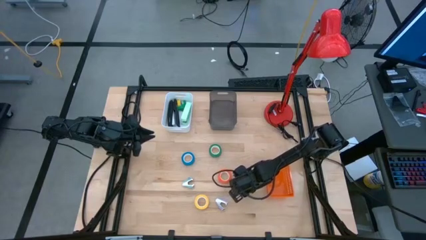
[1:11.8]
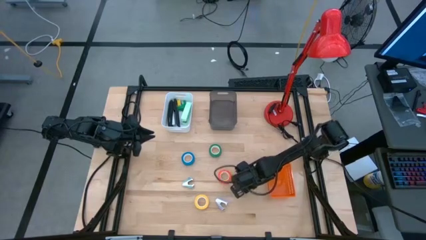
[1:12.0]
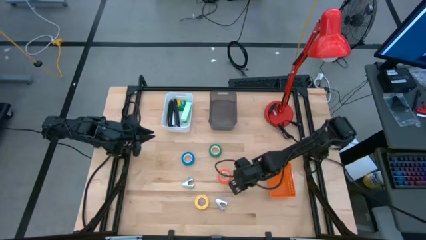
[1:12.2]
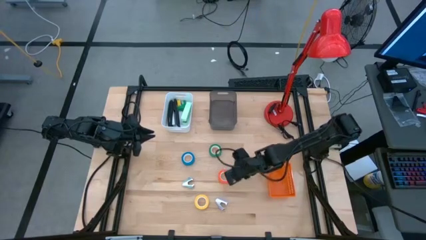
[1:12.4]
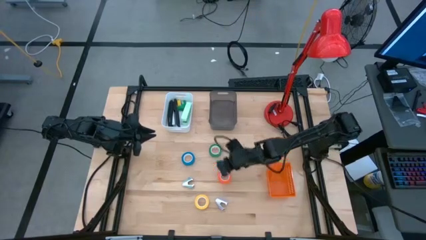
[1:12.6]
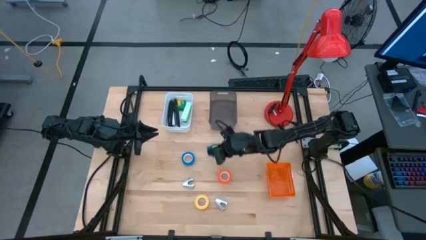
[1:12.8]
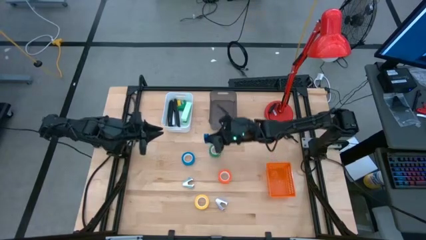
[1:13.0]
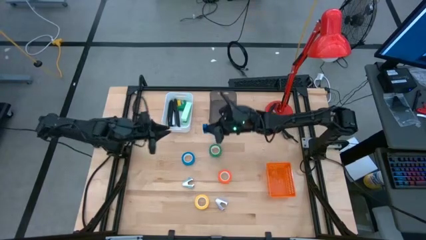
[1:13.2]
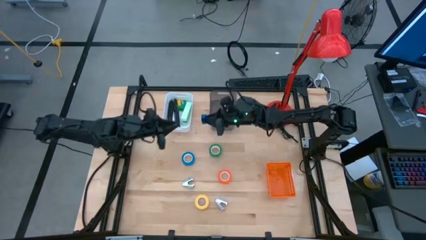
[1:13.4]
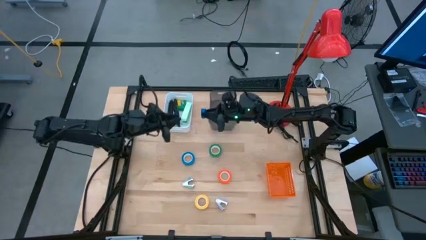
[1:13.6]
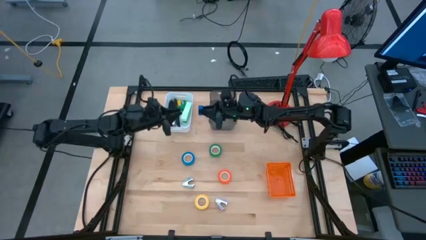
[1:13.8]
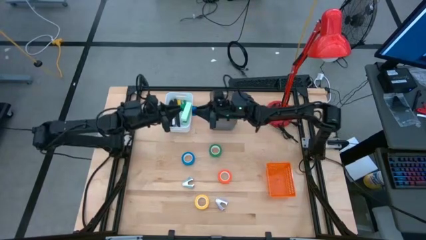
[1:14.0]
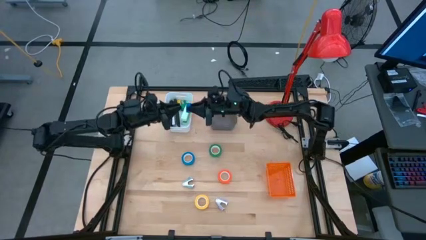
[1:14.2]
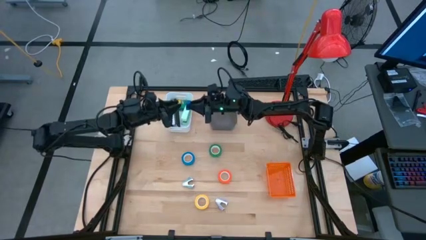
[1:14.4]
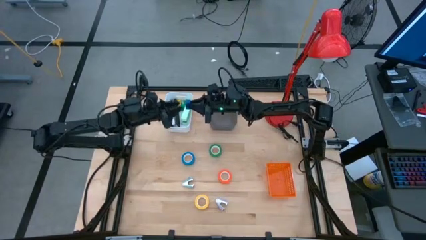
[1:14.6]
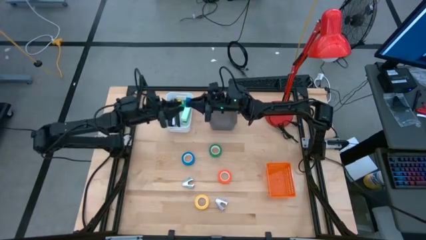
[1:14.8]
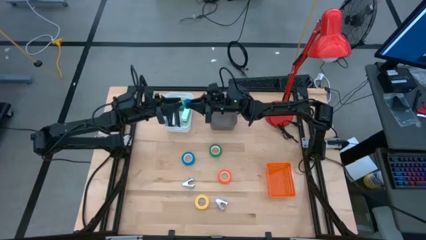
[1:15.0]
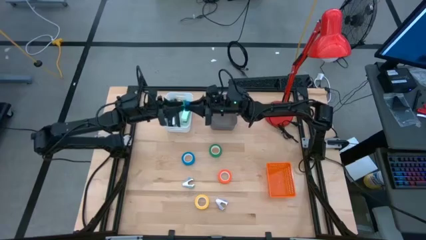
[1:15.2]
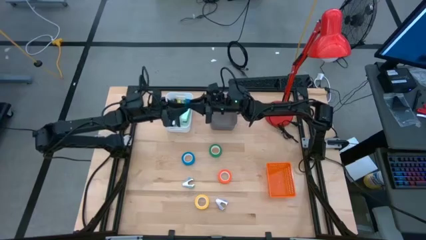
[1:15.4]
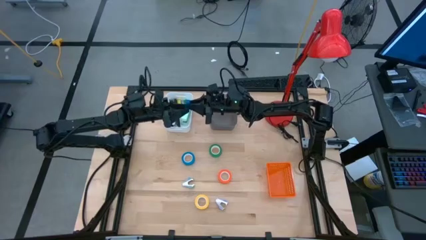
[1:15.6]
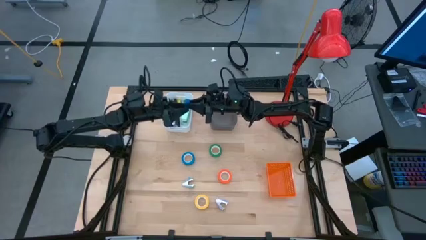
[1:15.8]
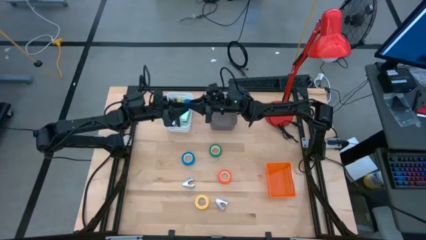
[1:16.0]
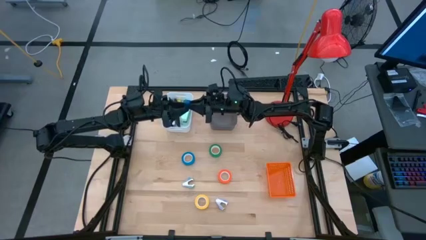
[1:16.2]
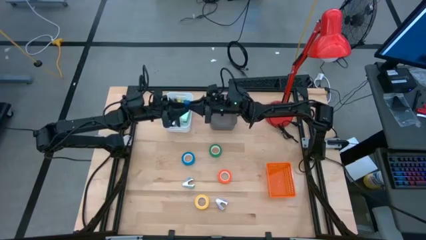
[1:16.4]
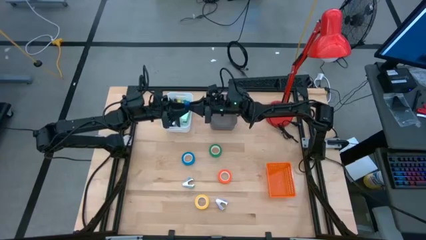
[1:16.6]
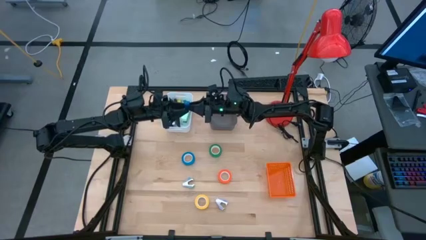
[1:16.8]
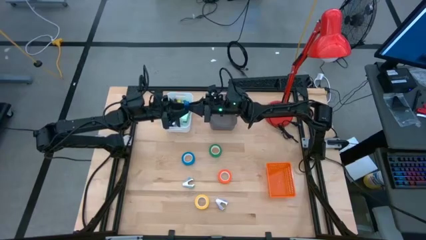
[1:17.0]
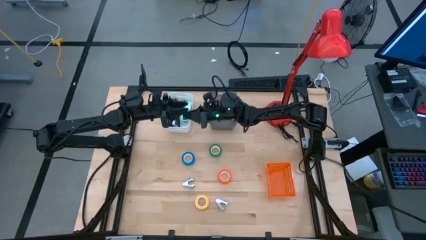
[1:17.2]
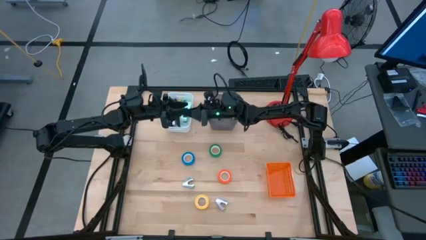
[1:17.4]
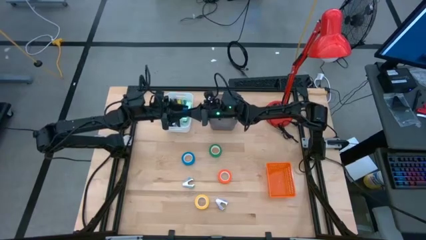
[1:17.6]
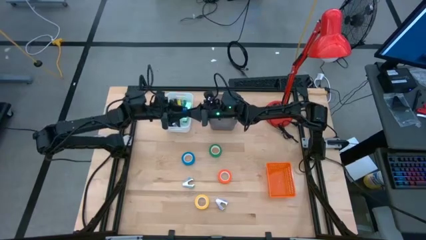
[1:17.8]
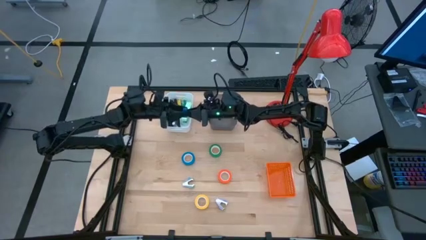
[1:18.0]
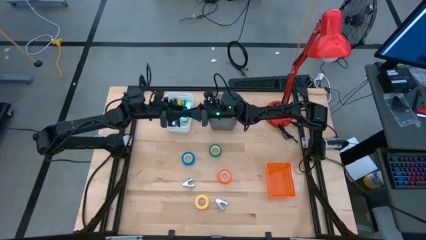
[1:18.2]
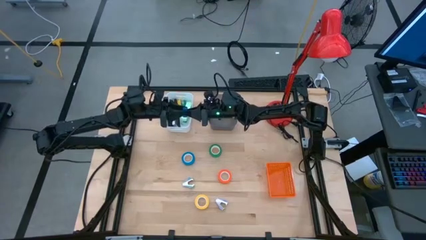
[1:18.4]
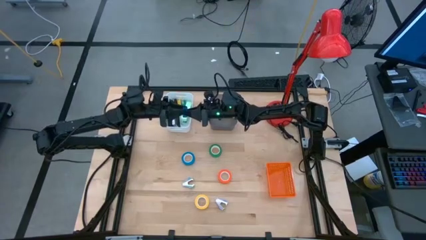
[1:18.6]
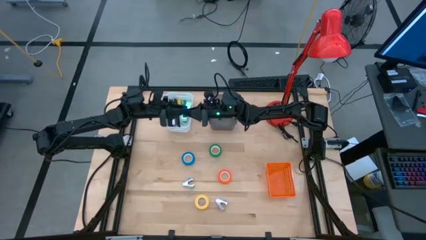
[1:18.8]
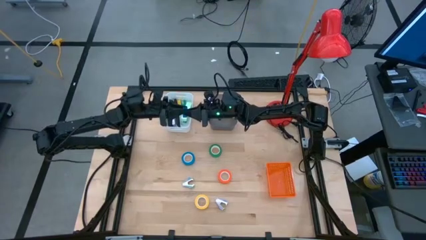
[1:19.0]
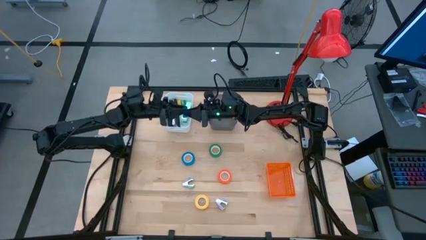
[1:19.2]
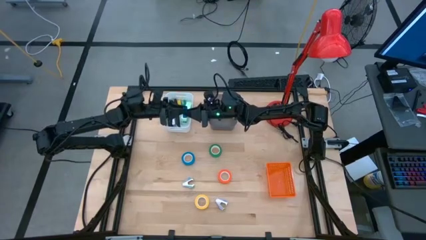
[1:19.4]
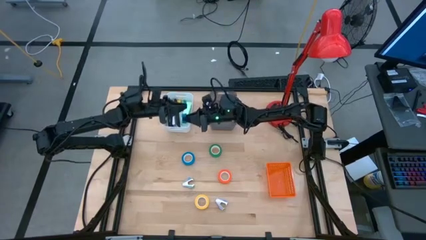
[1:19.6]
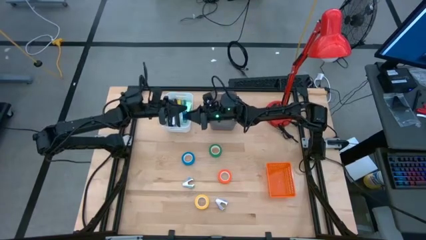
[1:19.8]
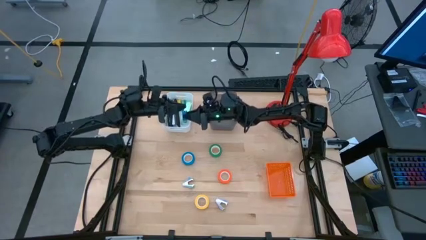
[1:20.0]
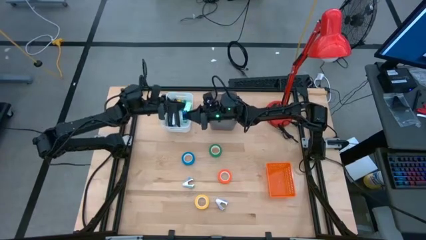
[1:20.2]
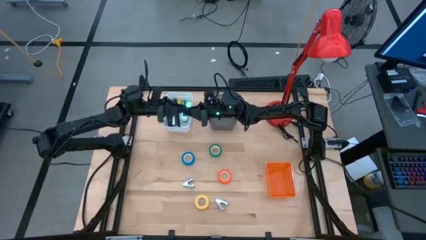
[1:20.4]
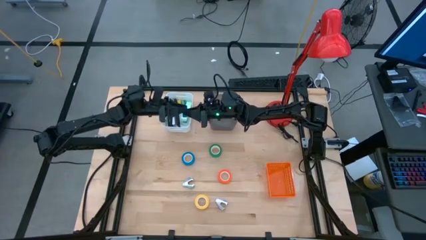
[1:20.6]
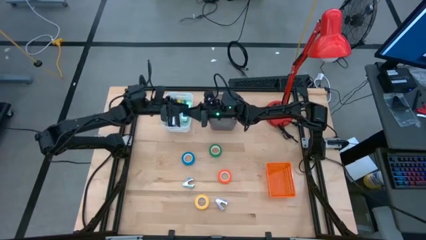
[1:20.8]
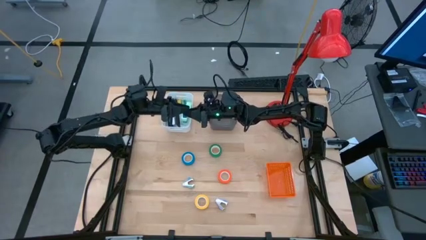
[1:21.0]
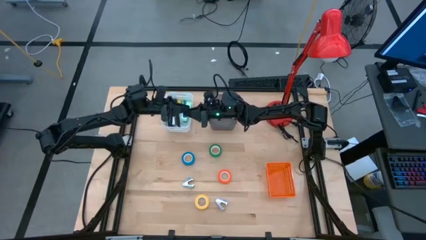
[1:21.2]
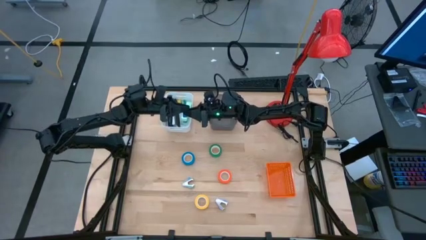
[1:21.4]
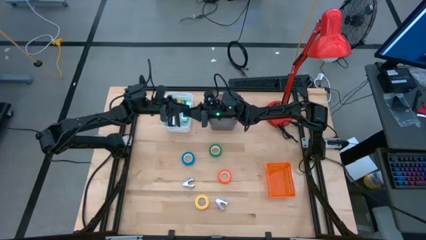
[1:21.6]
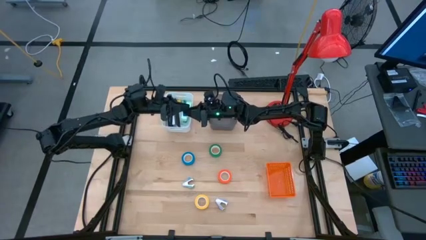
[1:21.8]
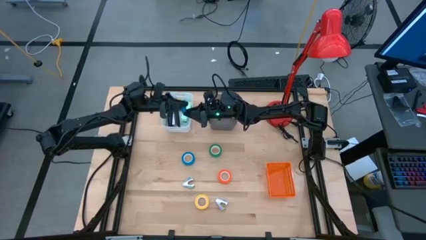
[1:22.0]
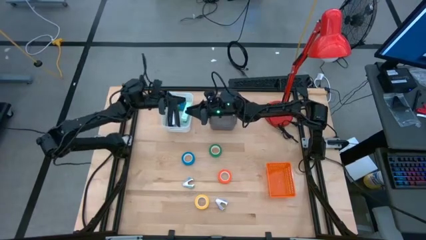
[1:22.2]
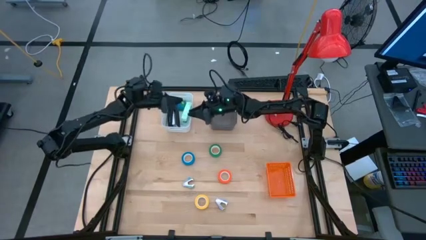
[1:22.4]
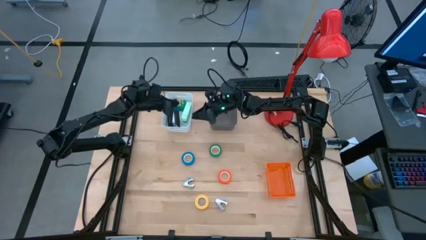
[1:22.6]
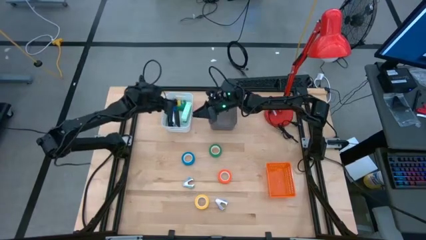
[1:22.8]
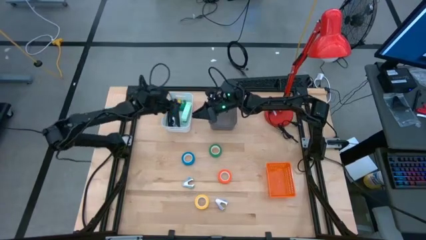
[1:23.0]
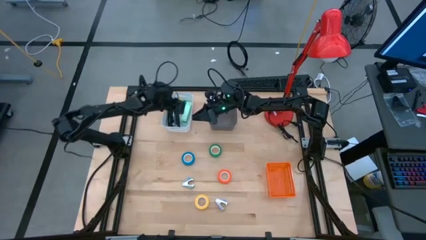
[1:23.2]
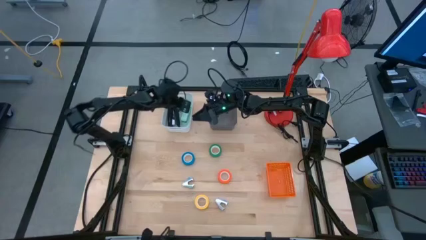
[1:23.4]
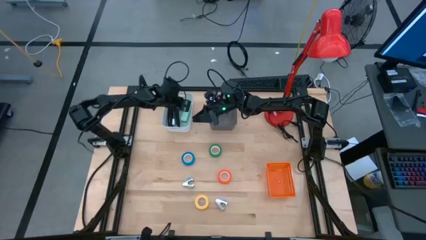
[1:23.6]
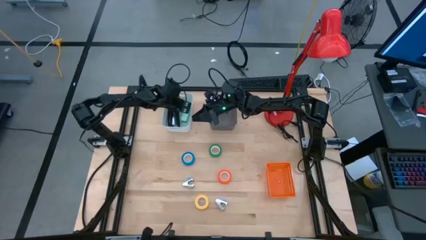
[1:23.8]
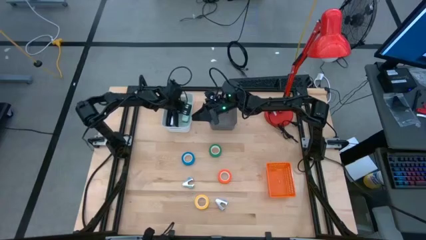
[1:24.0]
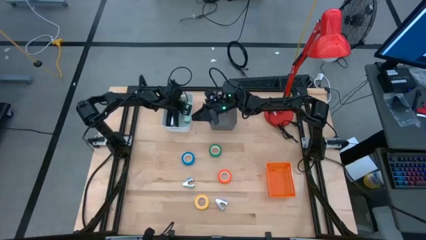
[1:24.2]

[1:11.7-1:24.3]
Task: Pick and place Stapler, Stapler remover, tape
Put the blue stapler into the white bin
